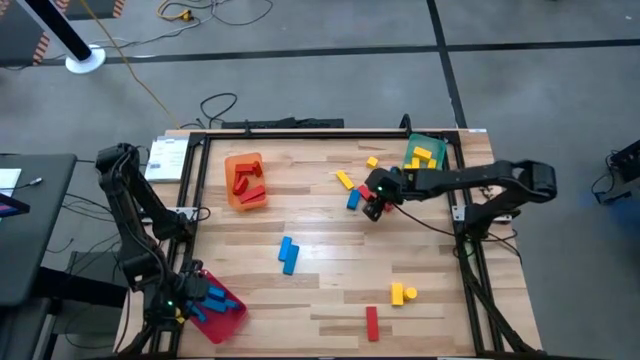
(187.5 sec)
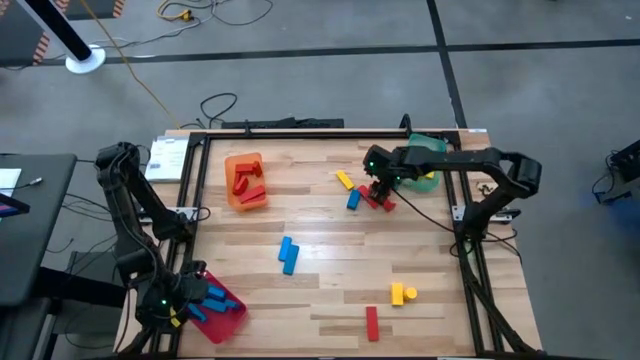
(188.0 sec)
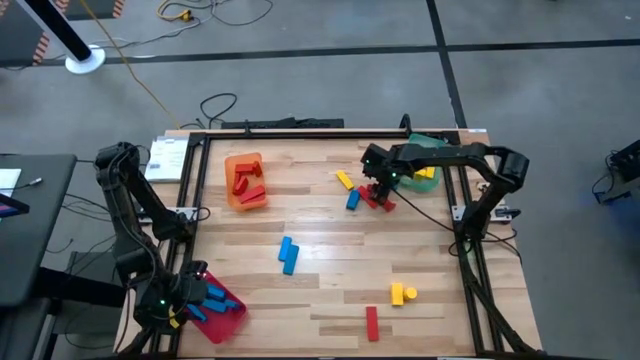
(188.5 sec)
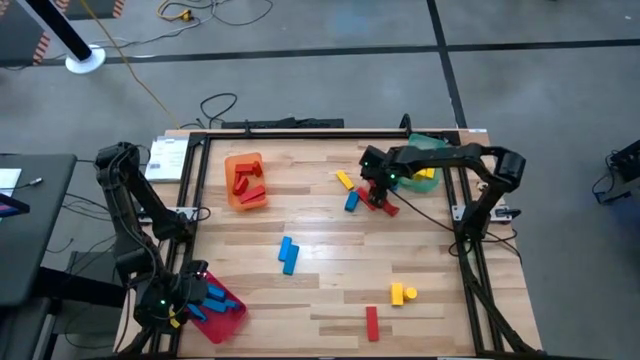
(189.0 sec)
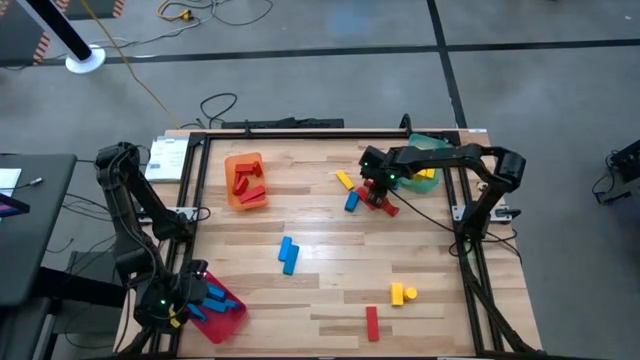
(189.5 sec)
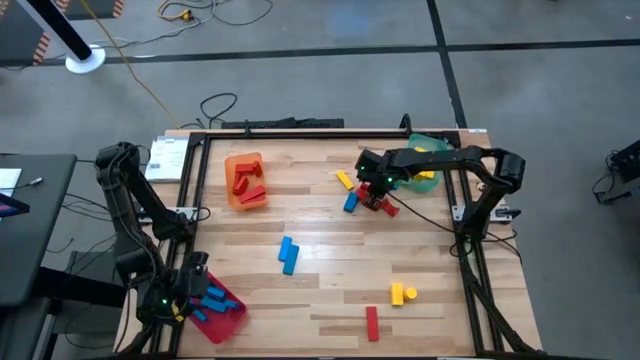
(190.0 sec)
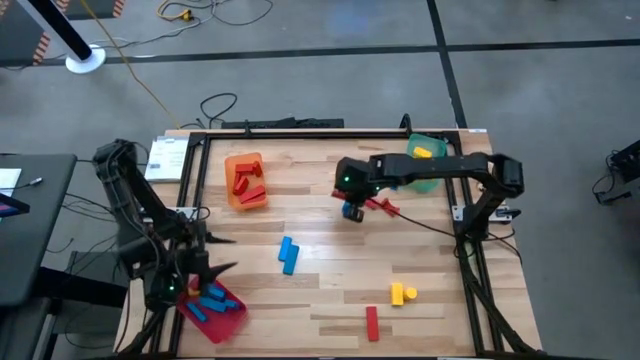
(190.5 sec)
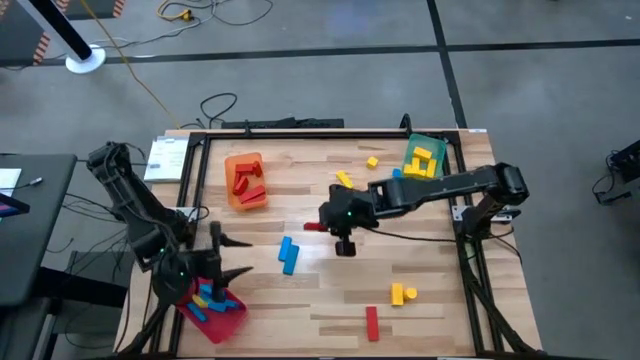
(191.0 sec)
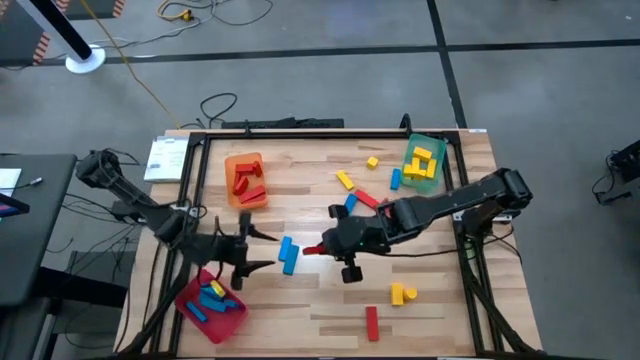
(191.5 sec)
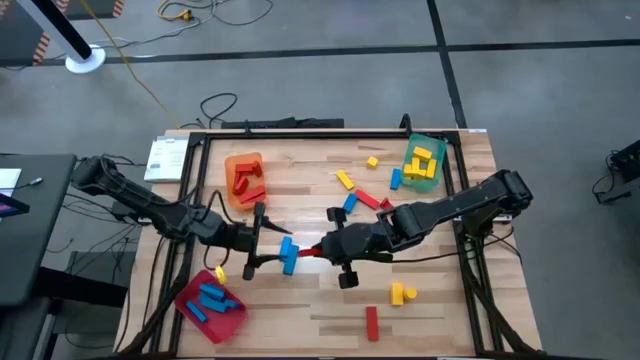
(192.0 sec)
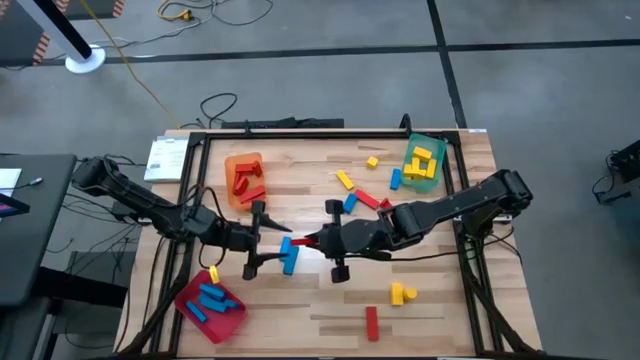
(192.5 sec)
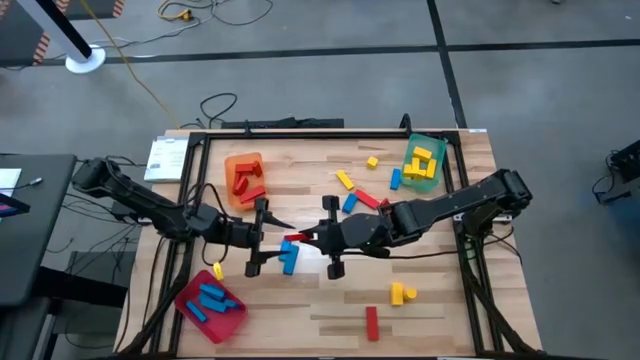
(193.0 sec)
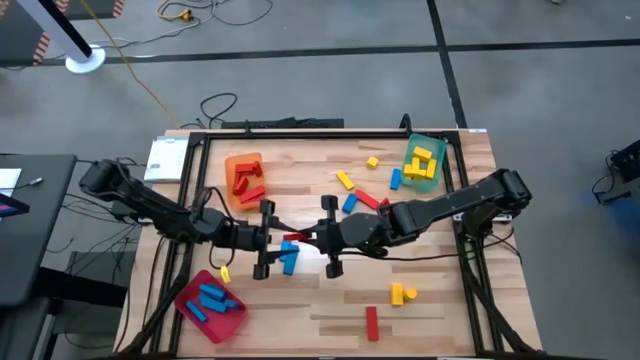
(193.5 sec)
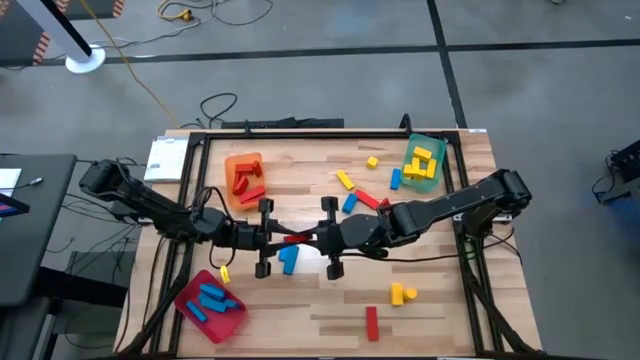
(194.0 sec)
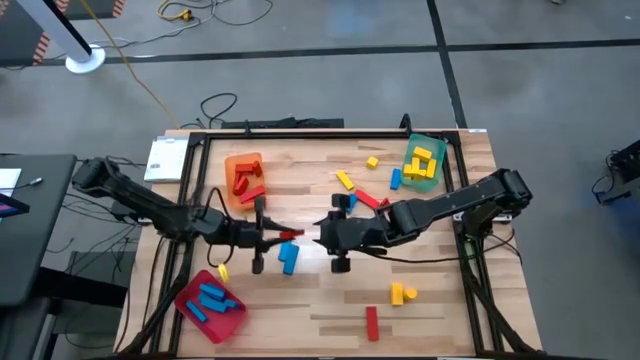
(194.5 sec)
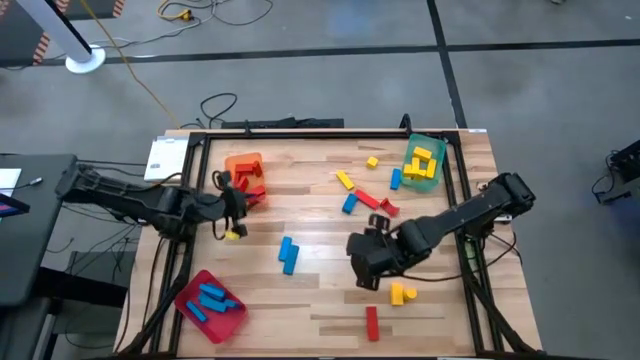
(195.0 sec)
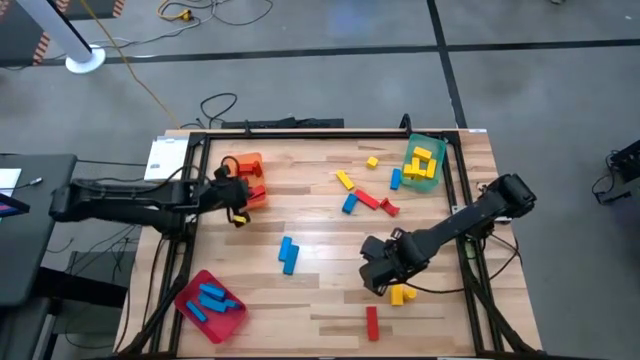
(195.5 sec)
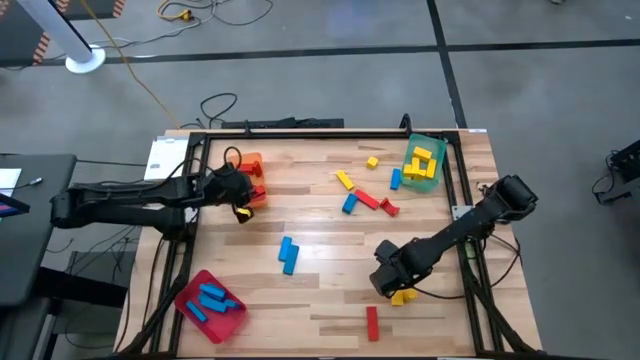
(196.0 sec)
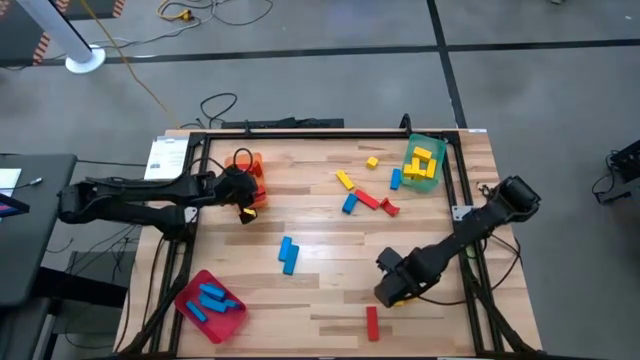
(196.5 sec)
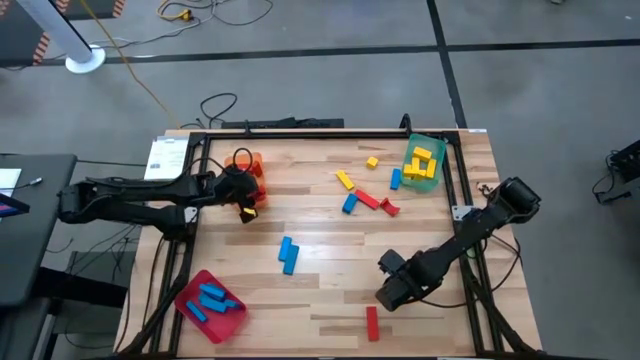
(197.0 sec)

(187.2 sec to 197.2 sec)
Task: Sort blocks
Put the red wooden block into the orange bin

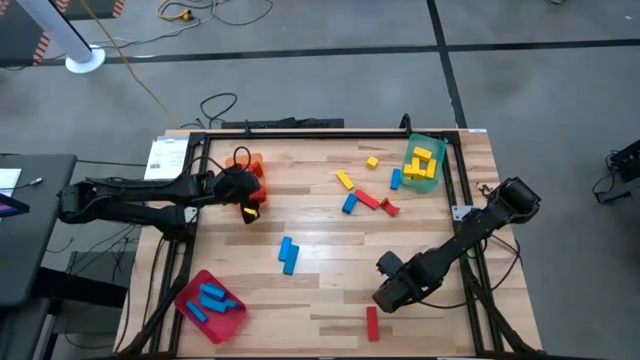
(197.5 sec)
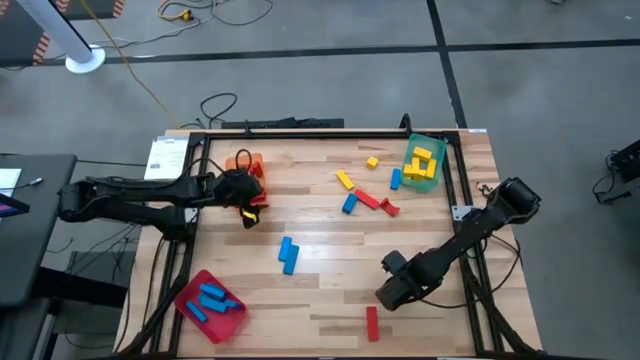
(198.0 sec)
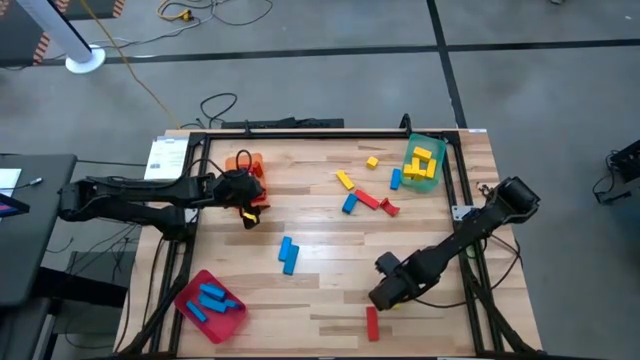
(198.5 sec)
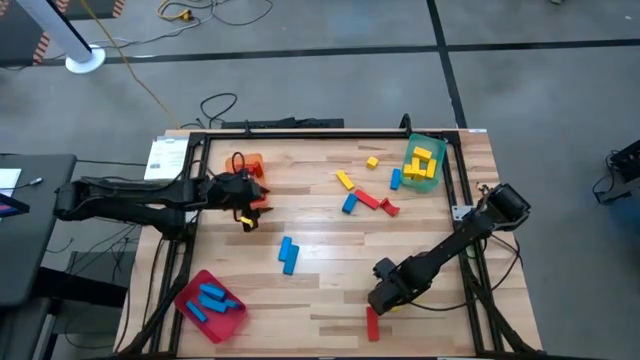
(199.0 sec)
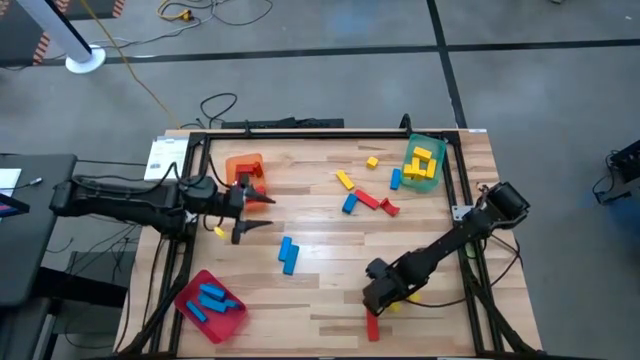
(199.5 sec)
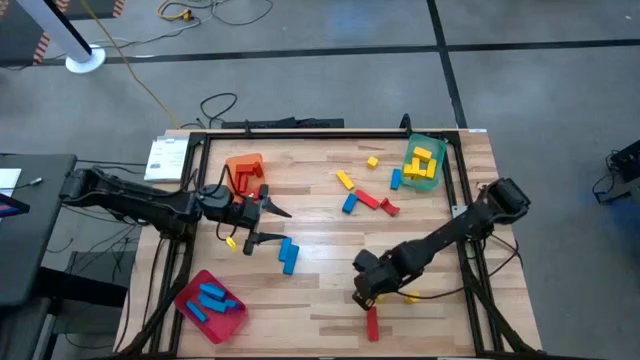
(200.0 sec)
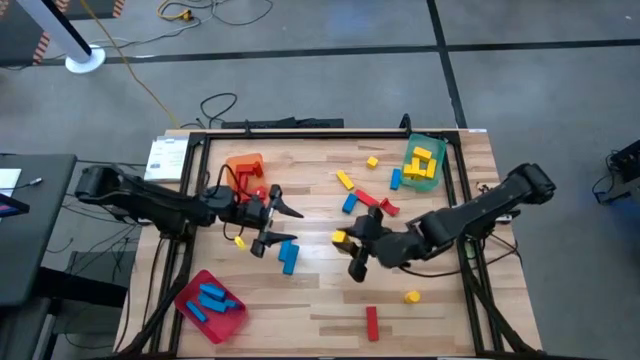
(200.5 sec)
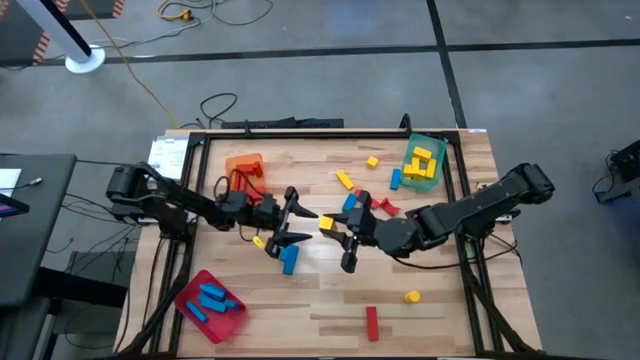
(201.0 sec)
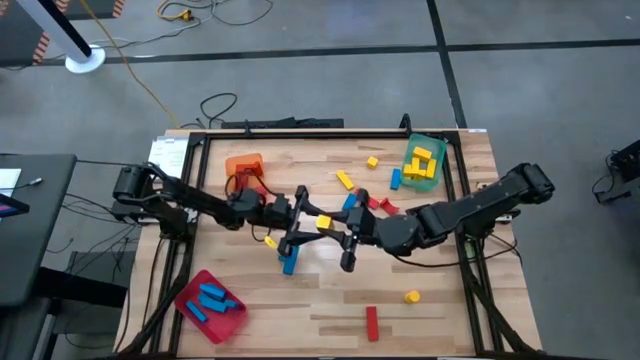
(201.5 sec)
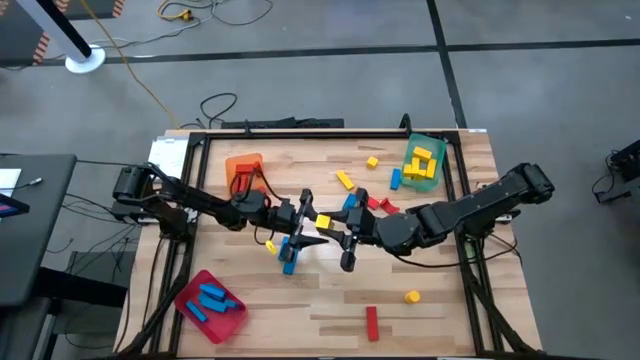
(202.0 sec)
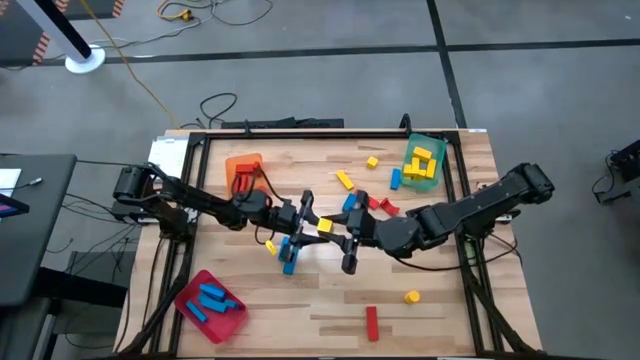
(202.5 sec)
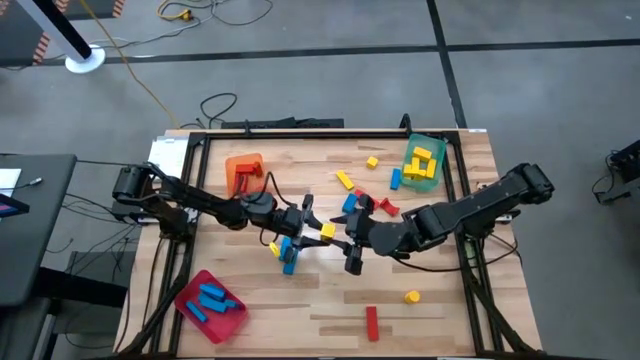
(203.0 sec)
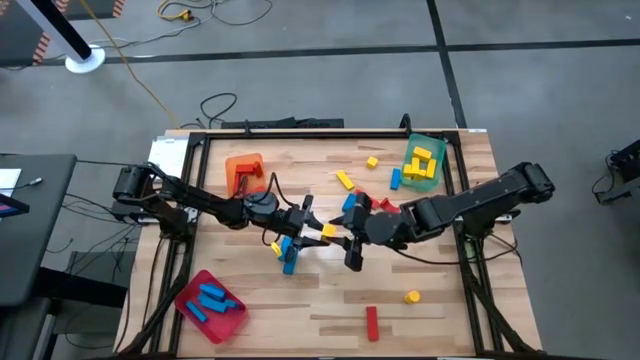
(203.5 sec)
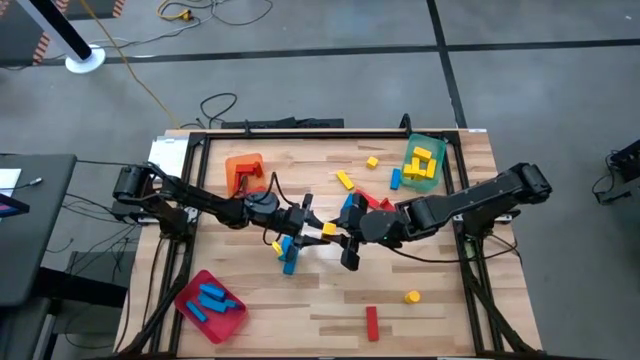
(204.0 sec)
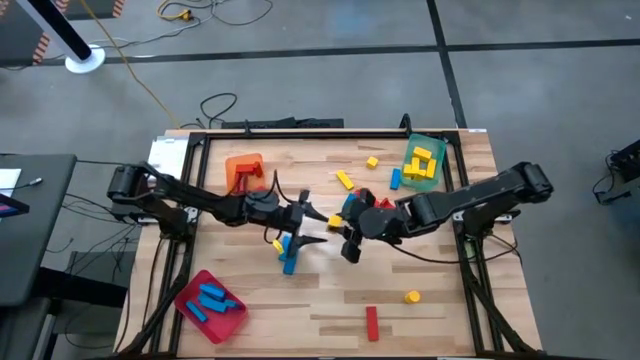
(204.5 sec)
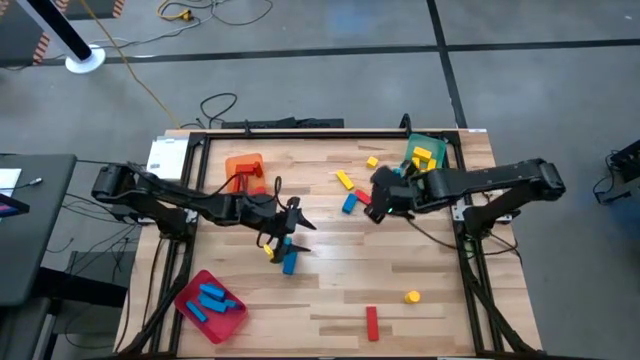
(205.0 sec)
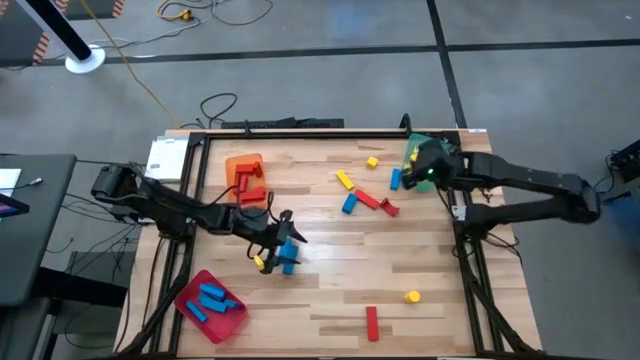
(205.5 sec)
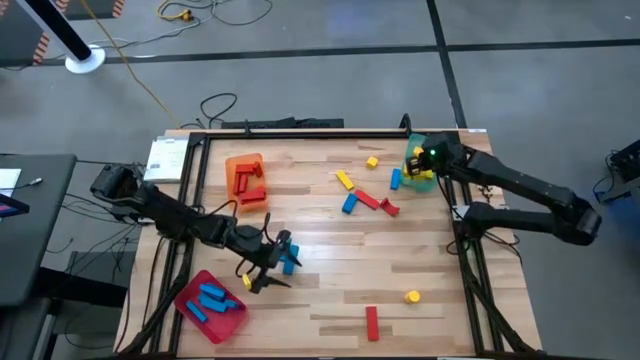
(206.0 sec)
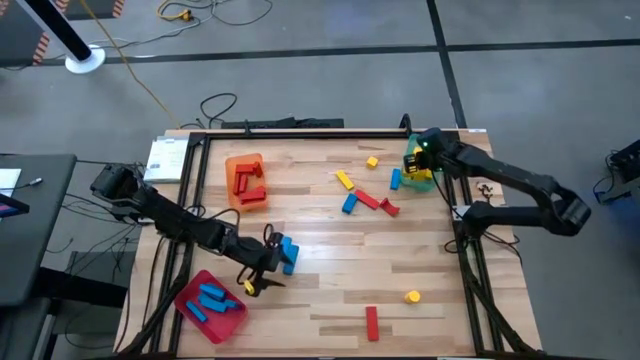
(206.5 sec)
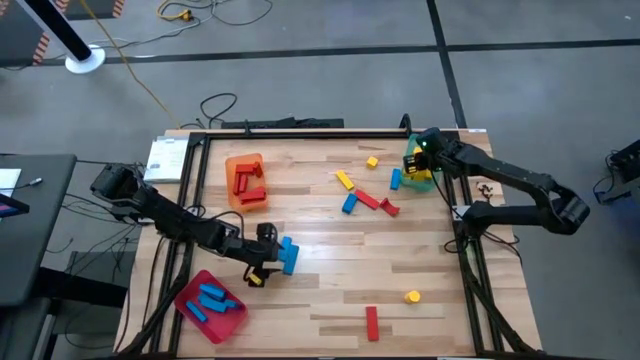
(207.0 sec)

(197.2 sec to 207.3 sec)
Put the yellow wooden block into the green bin
